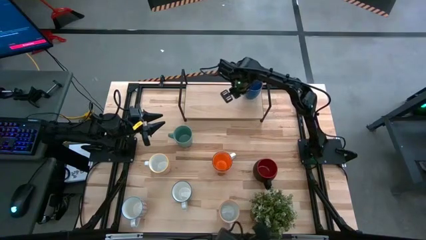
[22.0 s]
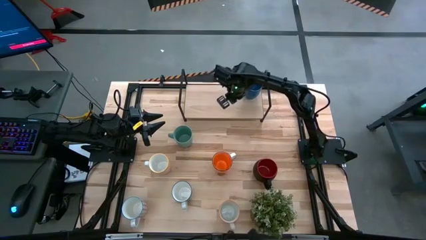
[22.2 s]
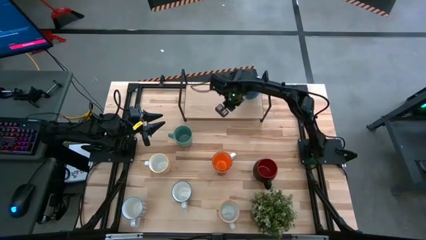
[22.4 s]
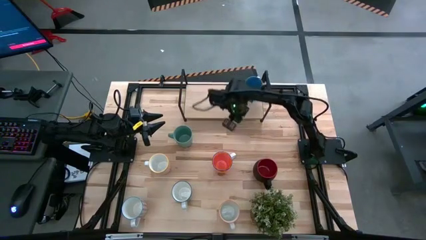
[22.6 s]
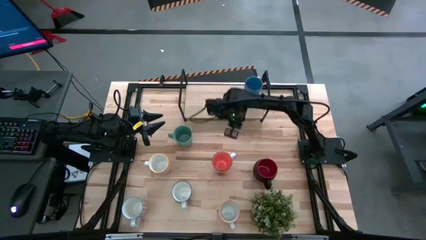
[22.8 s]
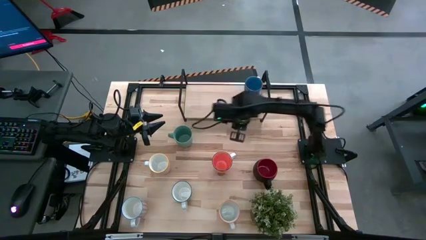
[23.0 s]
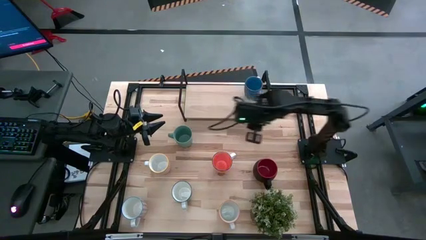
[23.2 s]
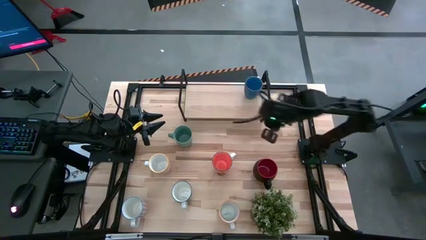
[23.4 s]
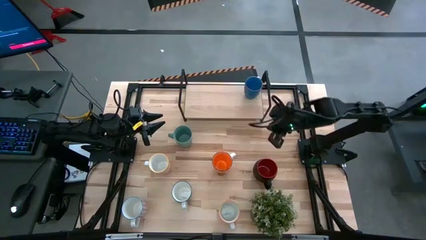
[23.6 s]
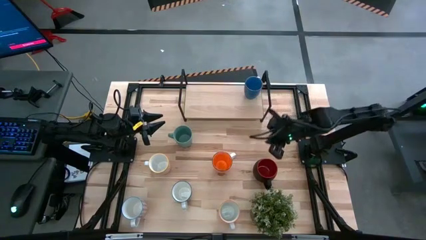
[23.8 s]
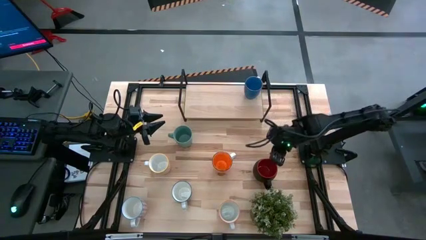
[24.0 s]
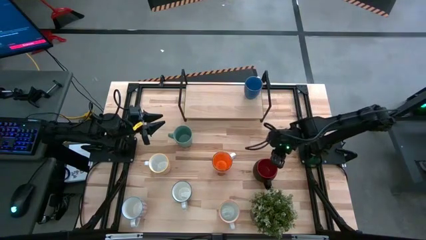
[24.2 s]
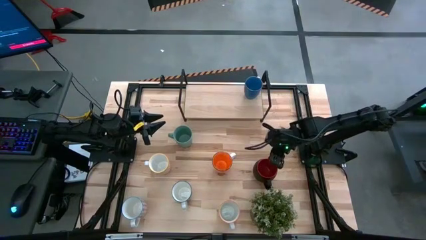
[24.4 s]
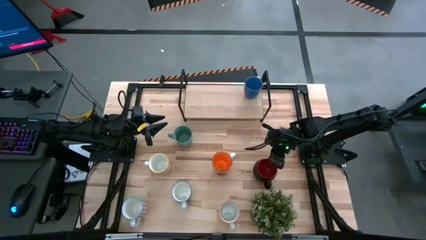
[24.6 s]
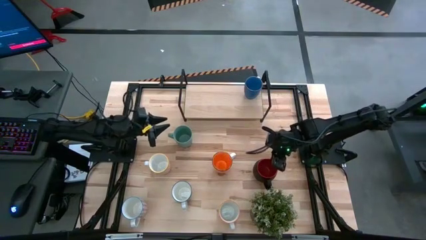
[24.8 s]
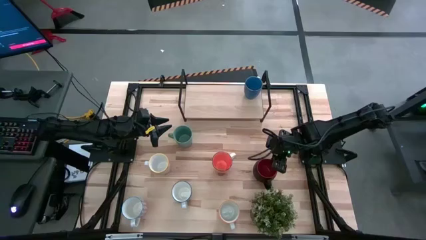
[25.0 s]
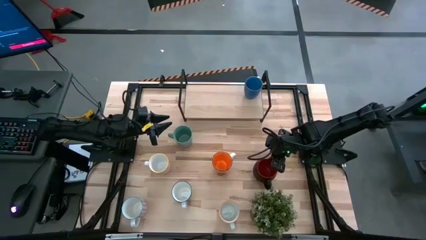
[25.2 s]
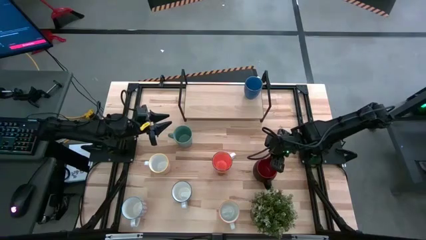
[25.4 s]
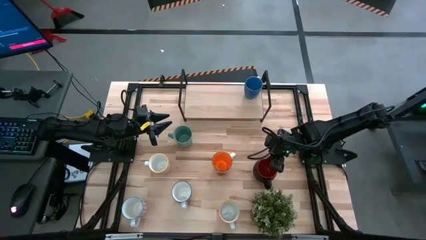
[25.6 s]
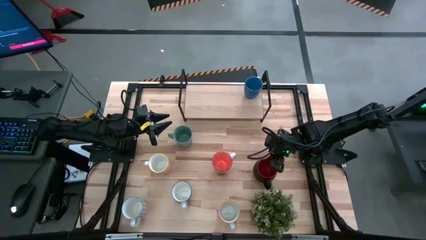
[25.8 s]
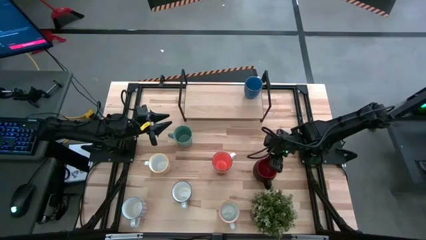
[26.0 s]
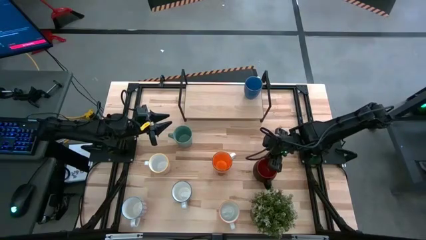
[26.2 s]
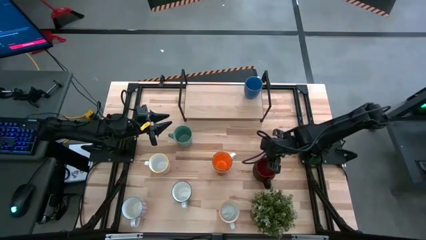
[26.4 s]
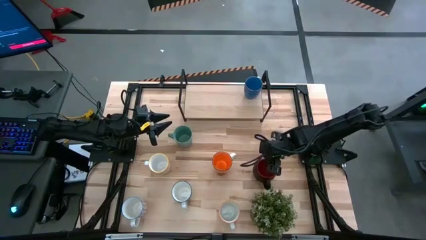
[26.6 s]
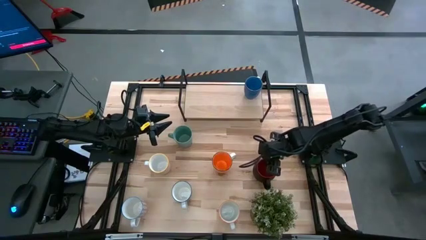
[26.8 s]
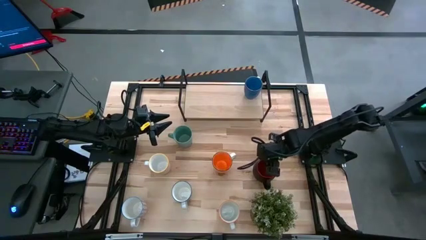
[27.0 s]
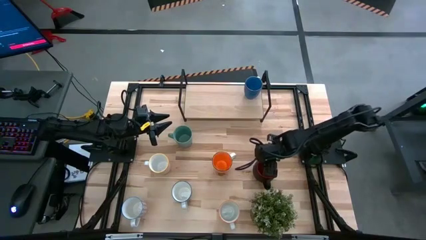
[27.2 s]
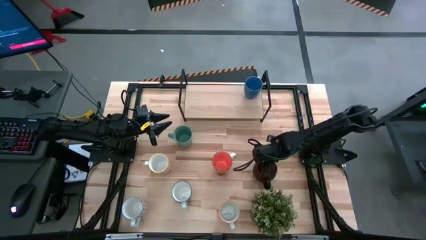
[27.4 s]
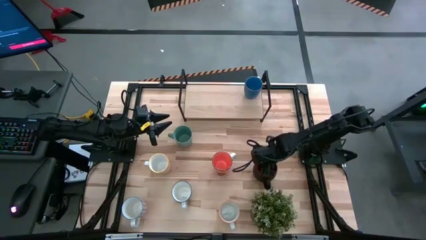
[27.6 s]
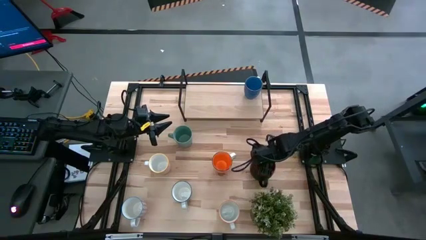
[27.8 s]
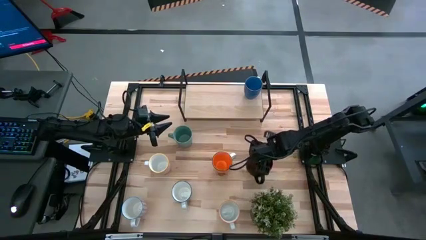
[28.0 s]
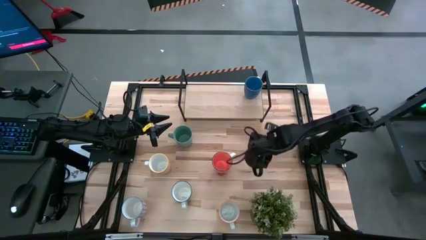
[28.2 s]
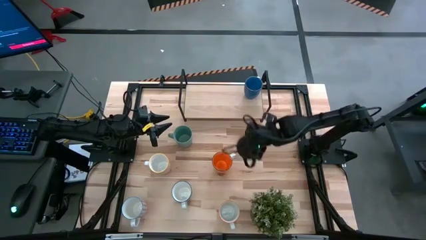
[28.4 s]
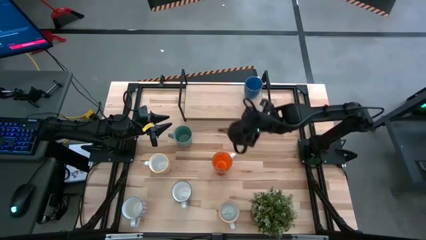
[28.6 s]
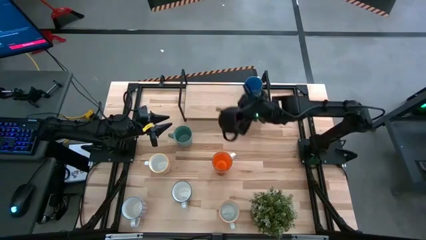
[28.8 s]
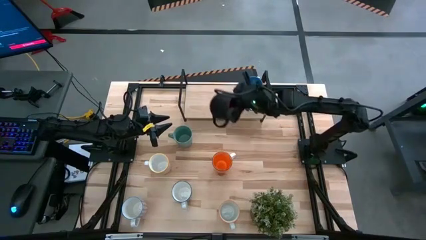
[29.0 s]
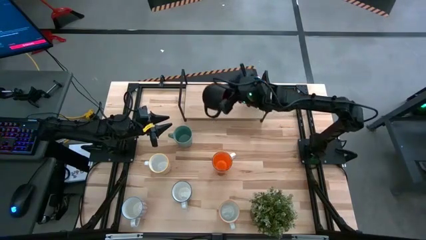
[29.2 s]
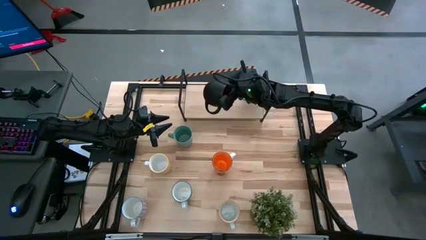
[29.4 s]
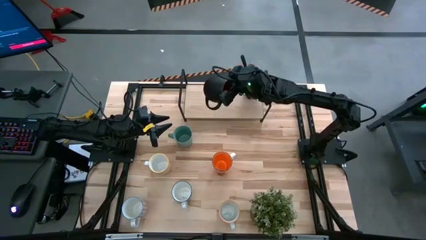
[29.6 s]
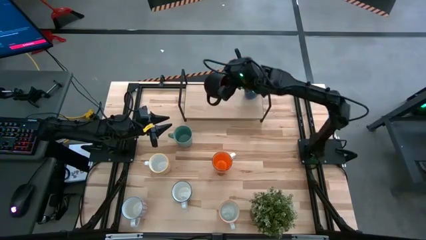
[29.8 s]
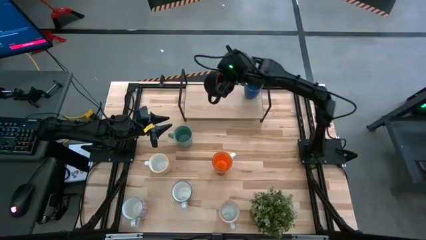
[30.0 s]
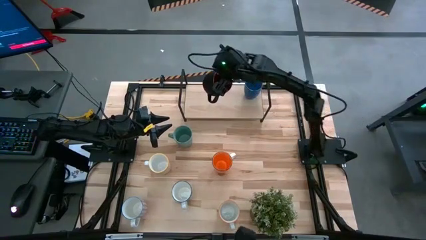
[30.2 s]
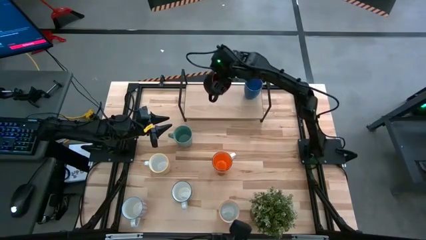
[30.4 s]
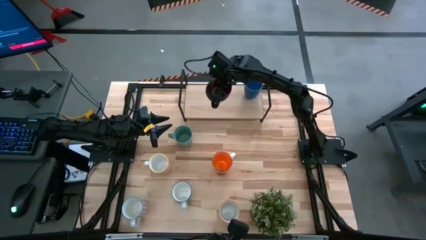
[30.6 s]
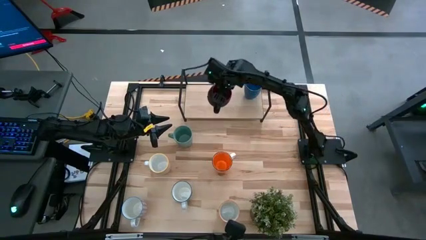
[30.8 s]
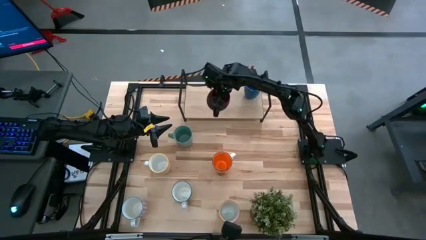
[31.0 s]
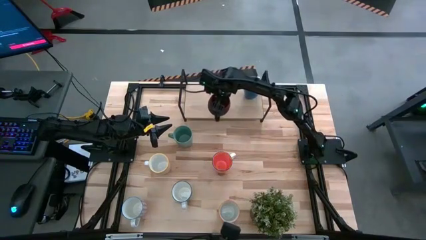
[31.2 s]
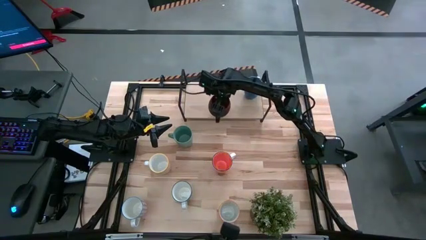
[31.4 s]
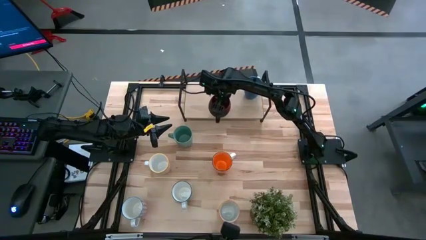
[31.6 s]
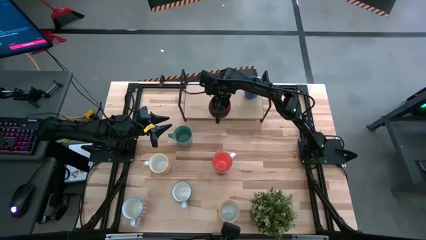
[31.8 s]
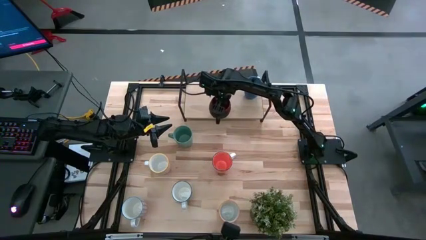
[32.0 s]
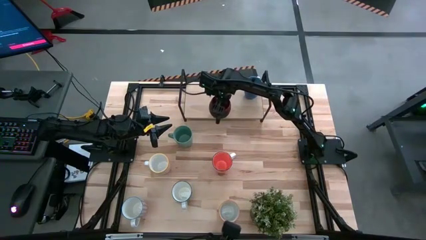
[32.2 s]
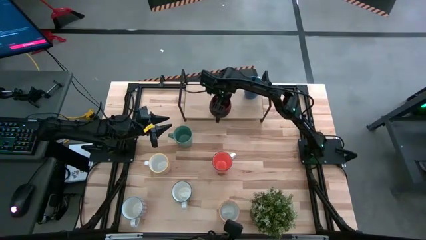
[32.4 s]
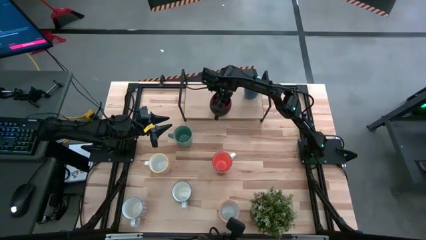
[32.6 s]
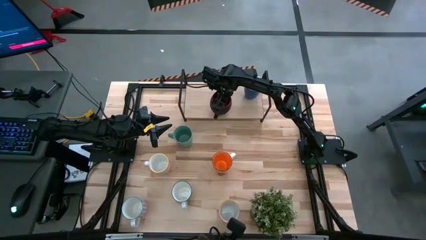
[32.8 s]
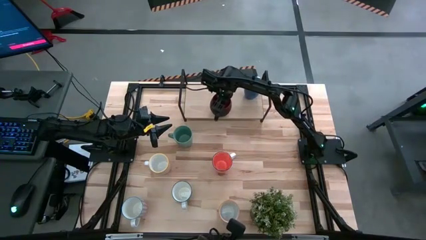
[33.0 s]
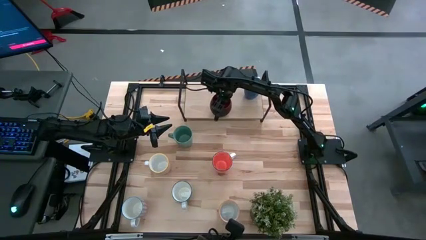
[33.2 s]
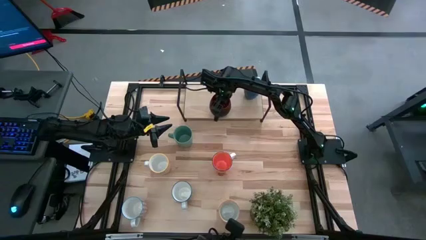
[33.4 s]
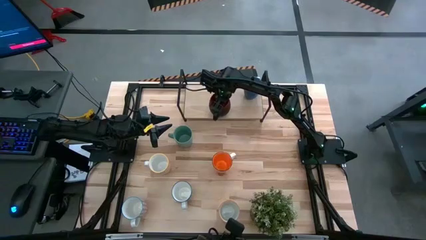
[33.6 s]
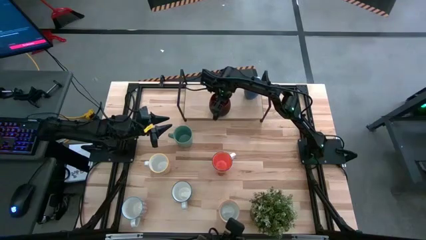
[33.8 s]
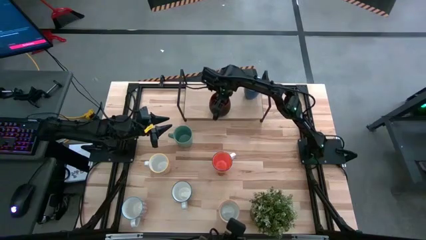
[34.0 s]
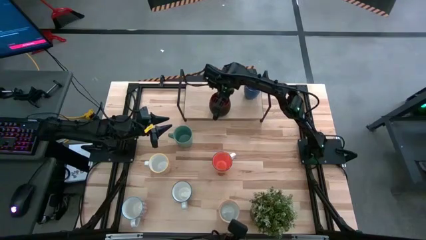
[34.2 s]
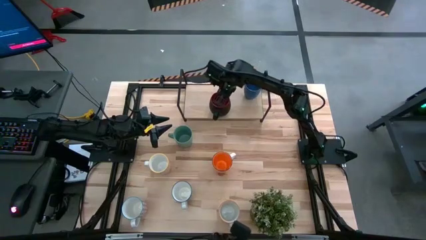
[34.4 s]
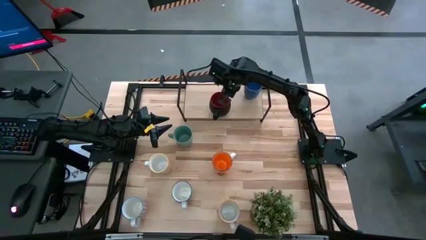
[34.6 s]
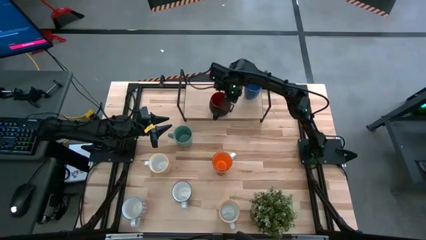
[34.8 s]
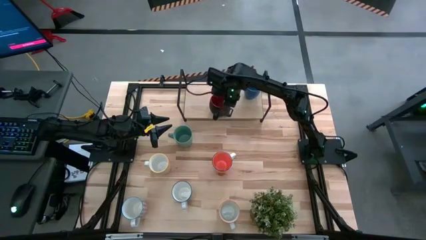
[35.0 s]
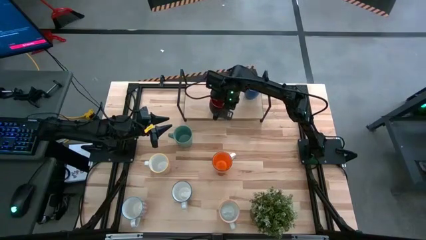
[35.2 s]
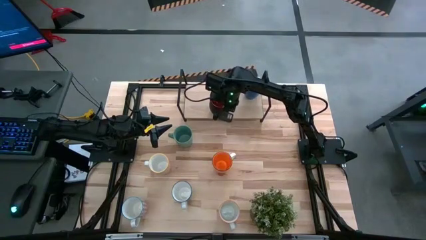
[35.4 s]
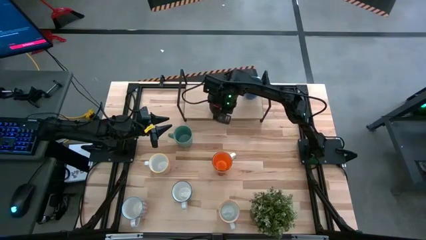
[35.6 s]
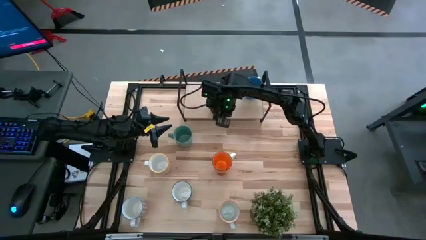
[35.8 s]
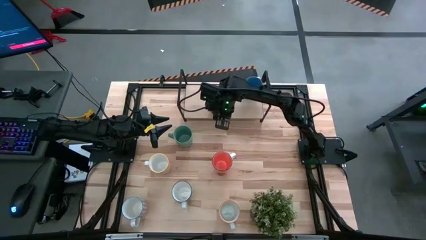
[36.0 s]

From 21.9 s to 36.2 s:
Task: Place coffee mugs
Put the black mug on the shelf

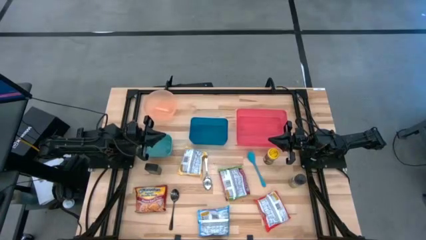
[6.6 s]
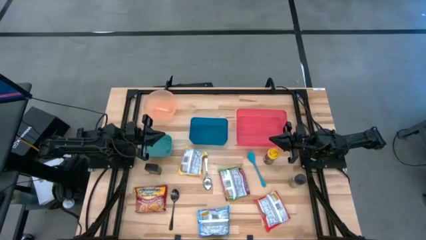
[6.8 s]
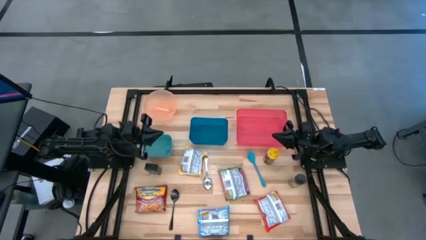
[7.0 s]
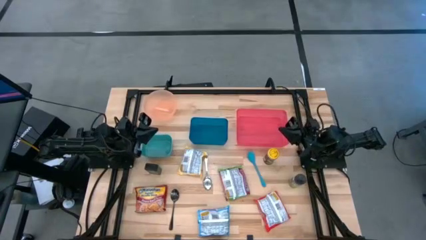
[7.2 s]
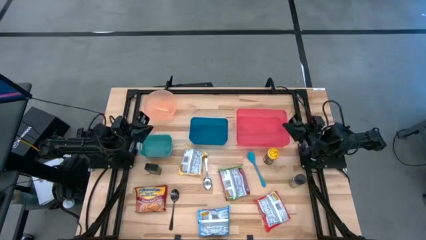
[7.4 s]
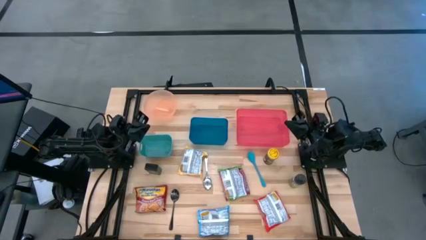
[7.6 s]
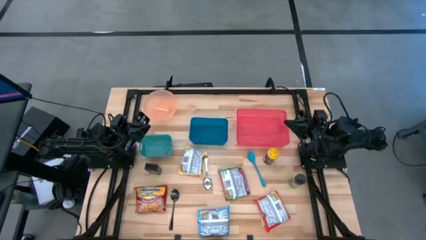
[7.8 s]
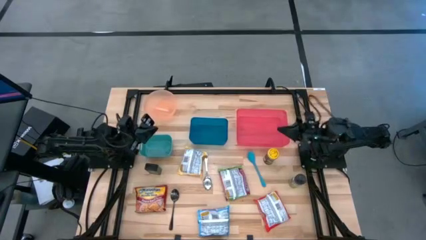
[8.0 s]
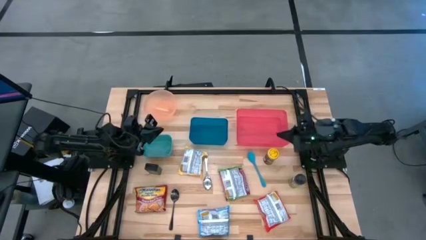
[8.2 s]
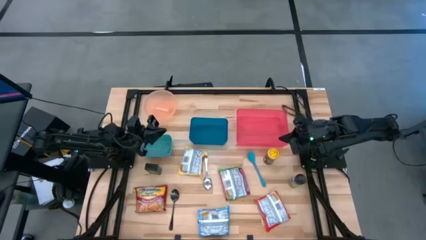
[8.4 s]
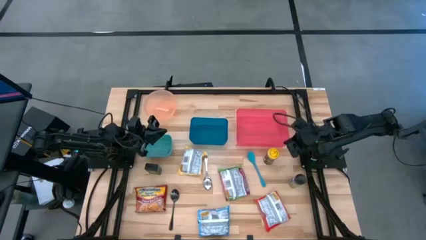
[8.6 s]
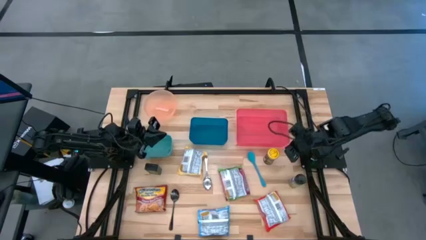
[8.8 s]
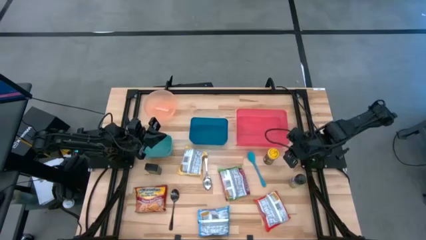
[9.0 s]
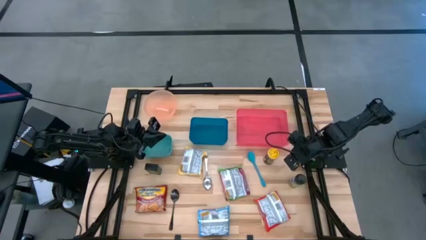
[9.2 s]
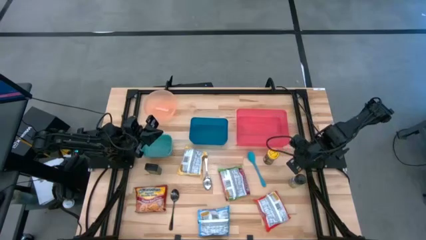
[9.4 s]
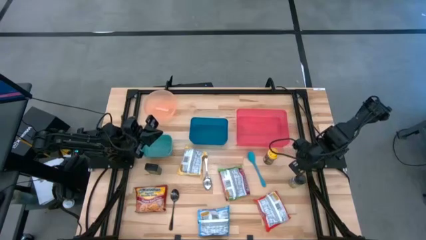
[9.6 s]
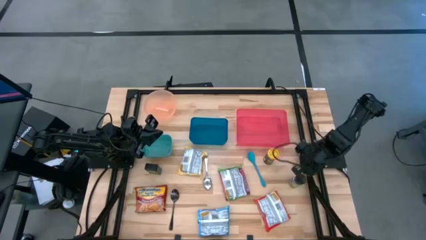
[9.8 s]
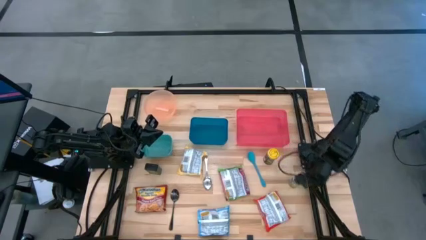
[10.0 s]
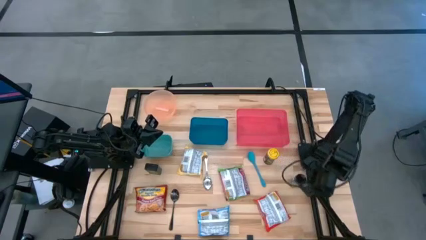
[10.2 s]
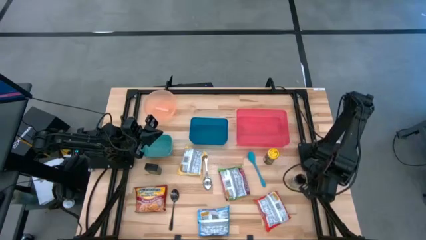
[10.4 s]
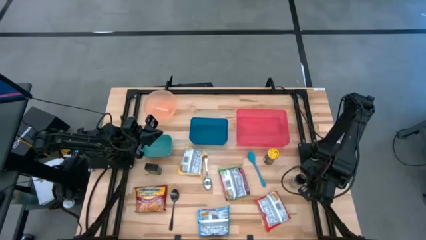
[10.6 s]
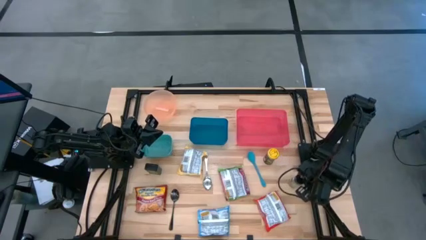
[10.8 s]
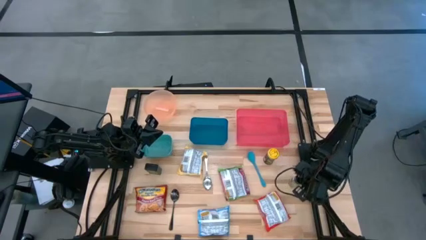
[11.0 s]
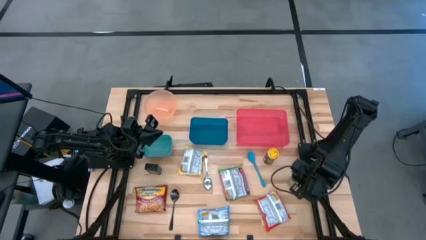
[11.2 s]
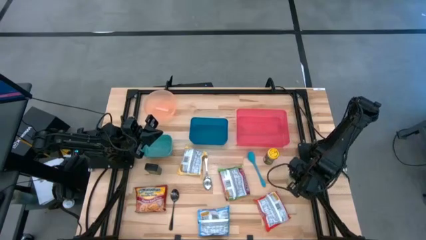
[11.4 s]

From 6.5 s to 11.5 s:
Task: Pick & Place Food Item
Put the green seasoning bottle into the blue bin
